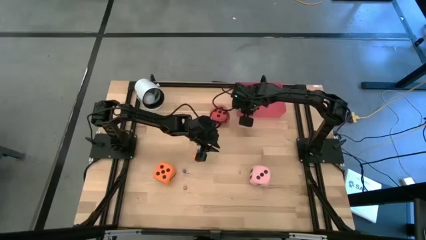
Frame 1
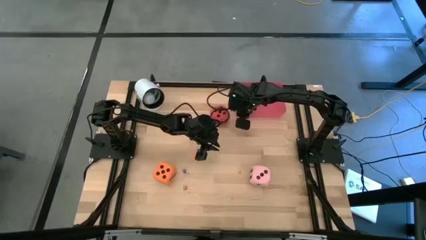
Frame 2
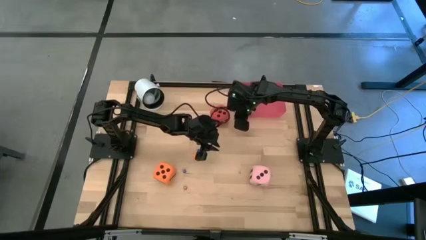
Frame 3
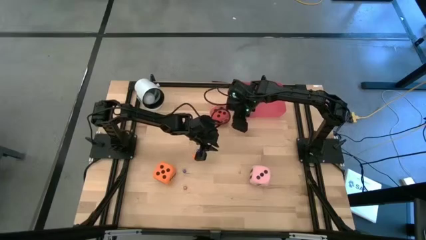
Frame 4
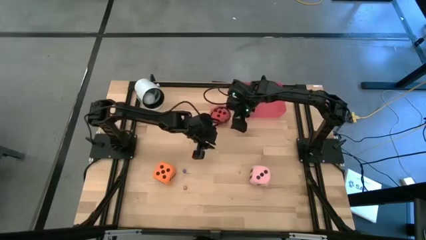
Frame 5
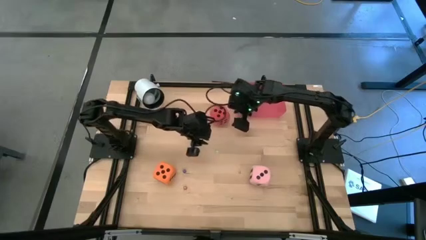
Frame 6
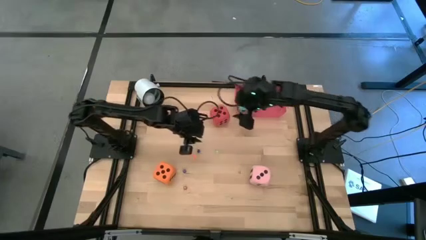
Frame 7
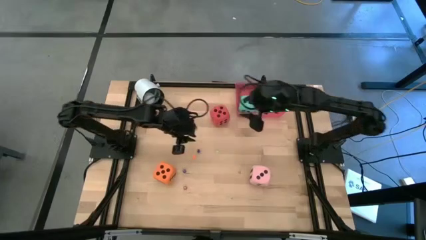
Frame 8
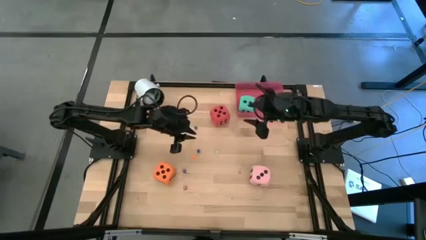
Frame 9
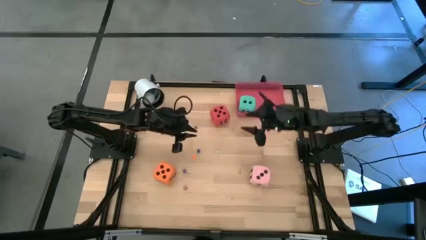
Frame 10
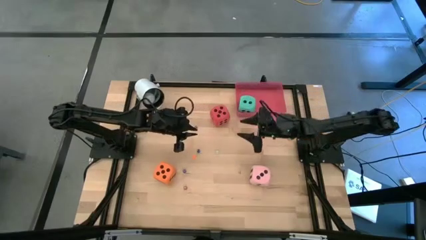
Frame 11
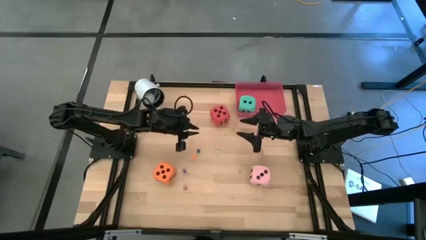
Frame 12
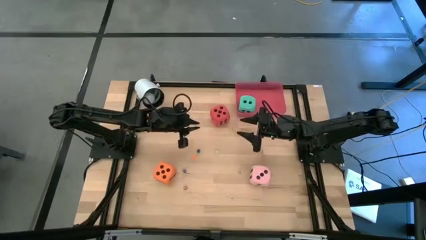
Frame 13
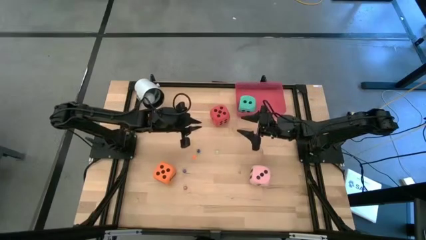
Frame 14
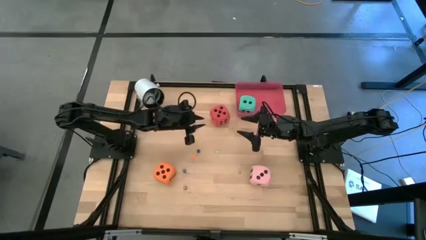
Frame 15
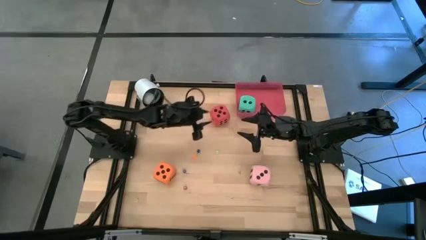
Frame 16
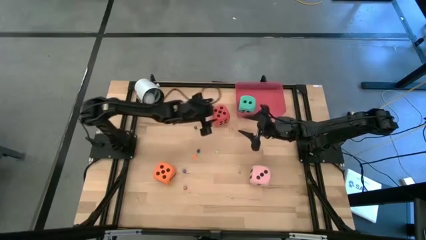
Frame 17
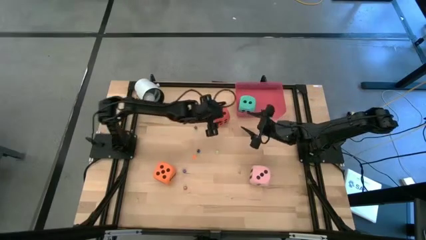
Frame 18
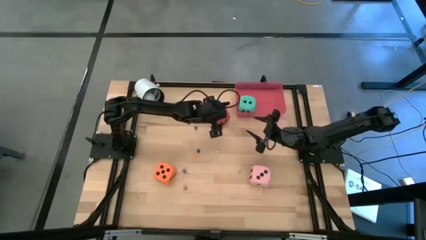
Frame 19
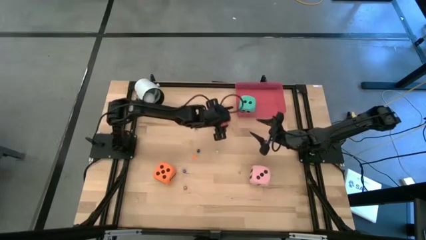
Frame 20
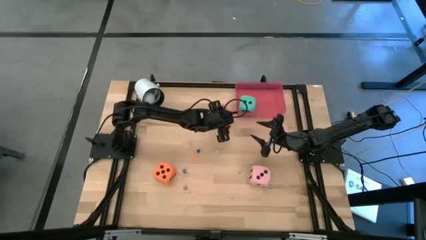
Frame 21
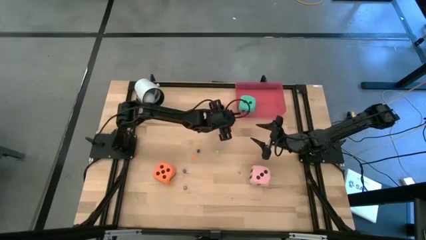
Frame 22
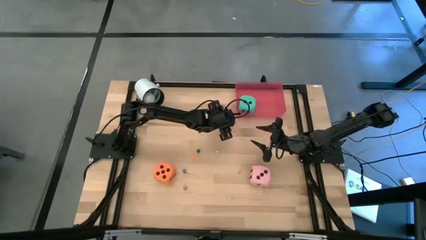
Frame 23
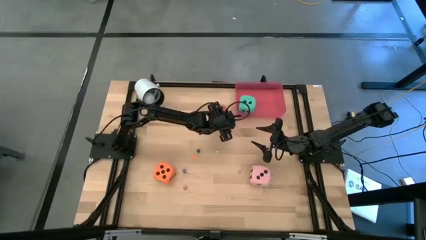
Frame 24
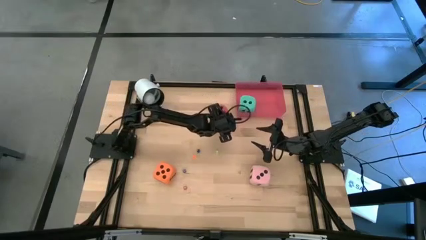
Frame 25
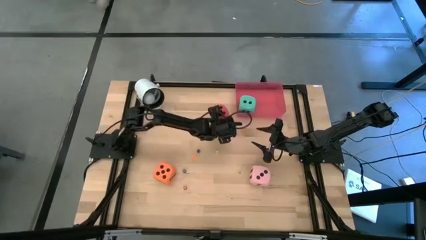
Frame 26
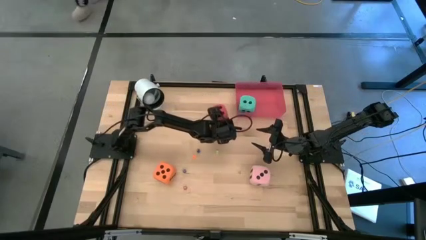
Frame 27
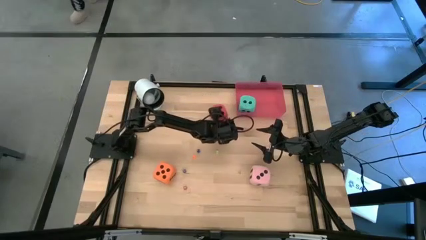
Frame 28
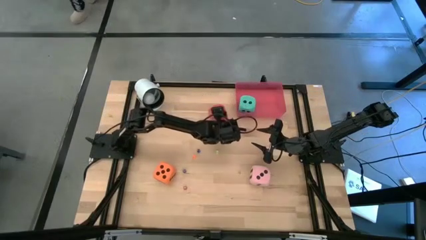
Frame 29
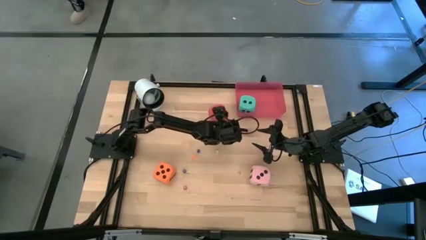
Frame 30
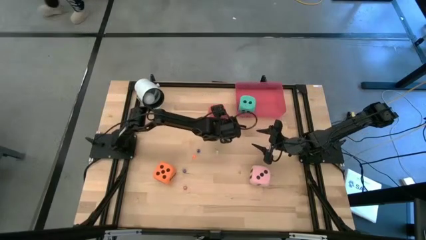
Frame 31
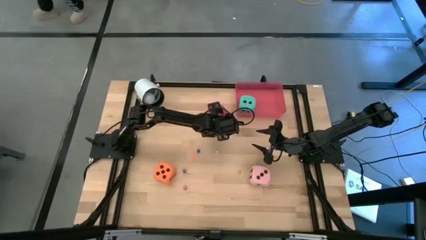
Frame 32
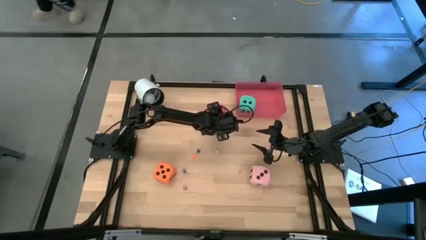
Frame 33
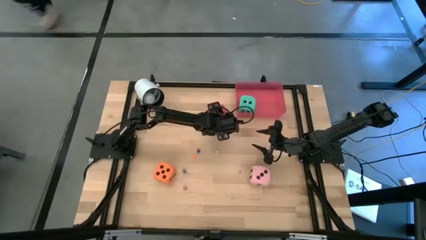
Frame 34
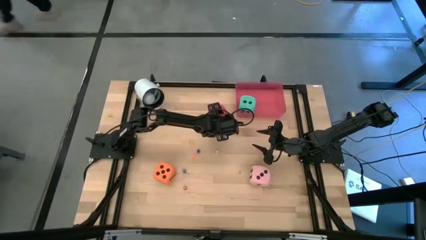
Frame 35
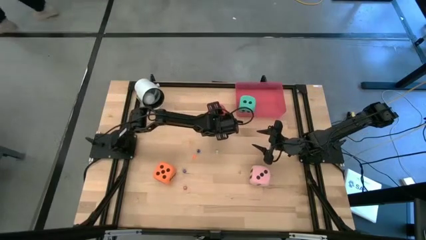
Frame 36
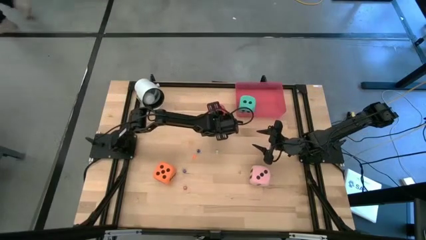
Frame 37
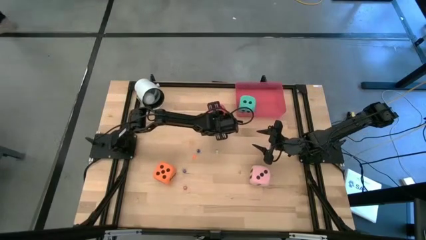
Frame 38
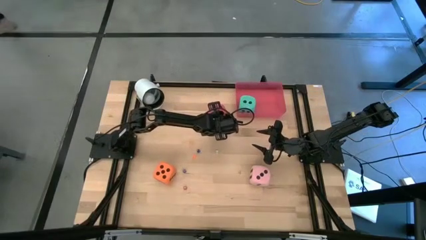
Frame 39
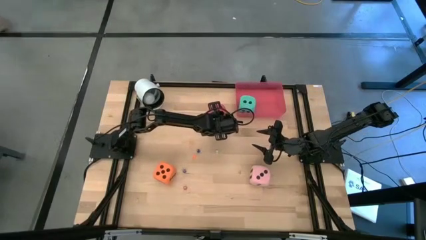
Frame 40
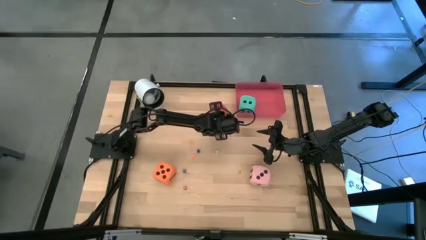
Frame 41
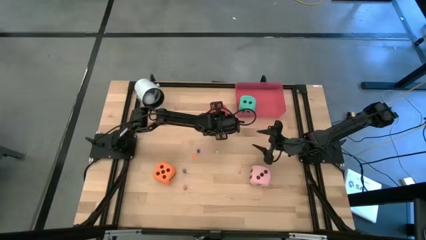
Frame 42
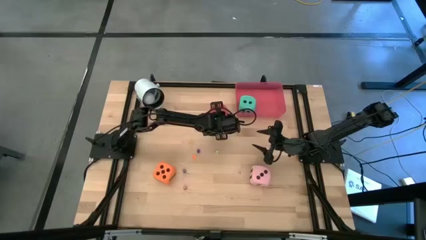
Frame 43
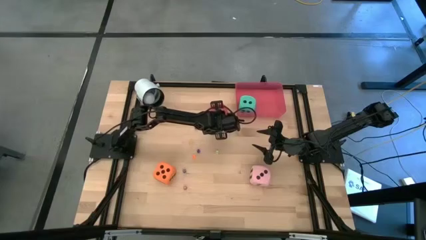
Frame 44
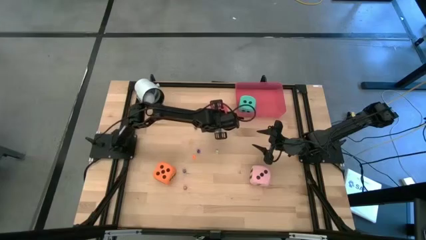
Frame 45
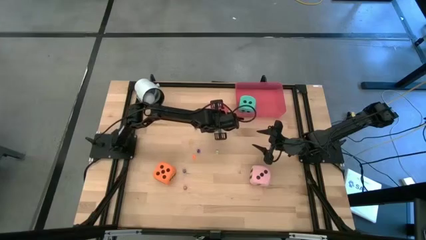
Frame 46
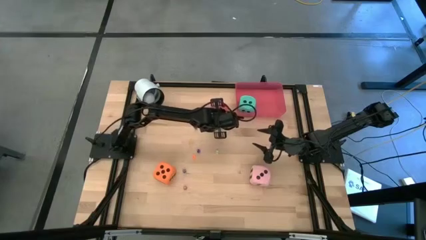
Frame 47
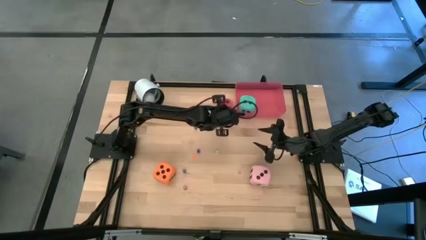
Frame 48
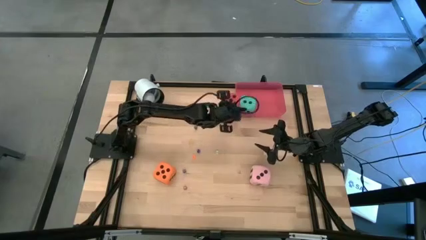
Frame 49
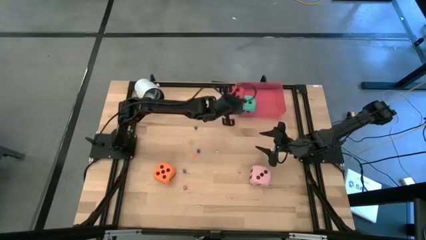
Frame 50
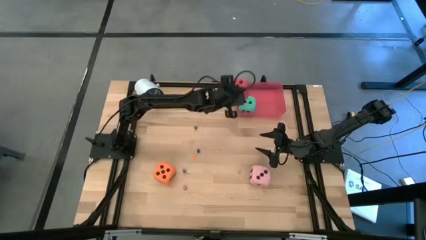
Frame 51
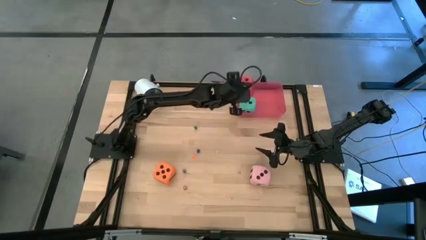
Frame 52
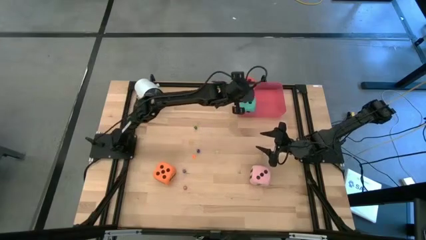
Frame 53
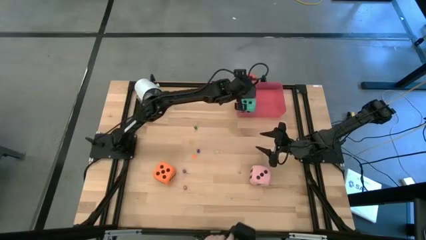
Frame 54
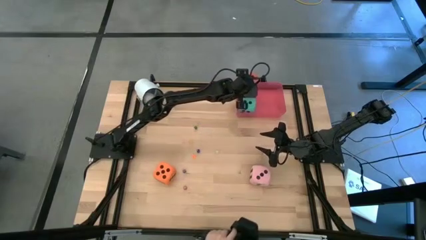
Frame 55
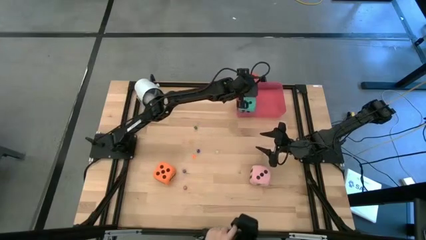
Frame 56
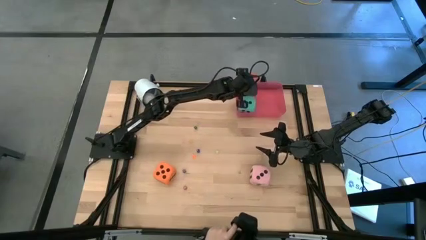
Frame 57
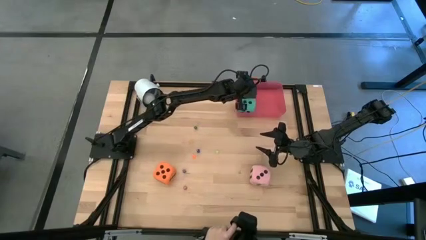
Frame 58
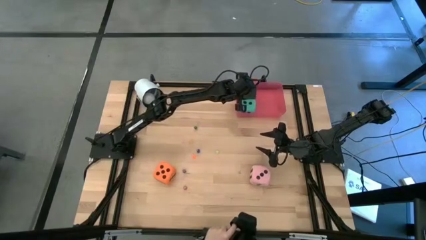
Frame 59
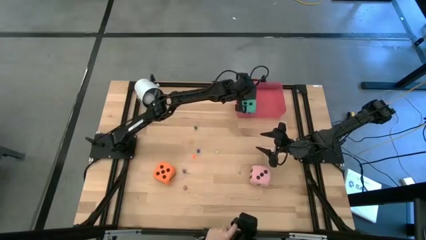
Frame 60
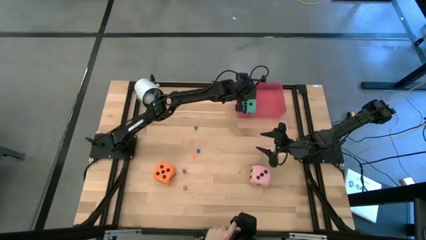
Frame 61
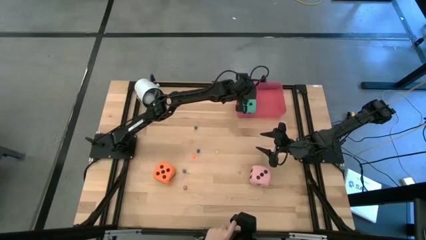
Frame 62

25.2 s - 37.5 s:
Task: Pick & Place Dice
Put the large red dice into the red bin
